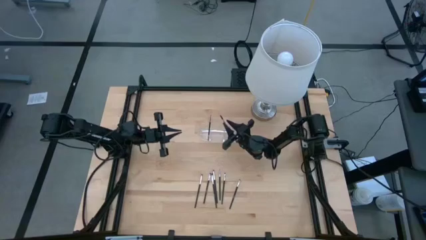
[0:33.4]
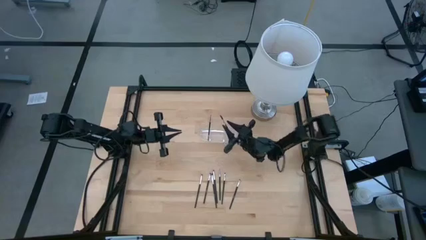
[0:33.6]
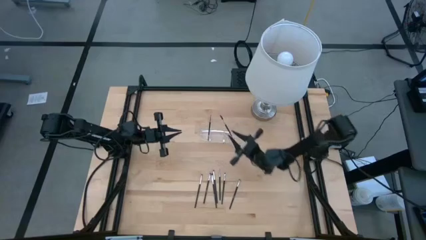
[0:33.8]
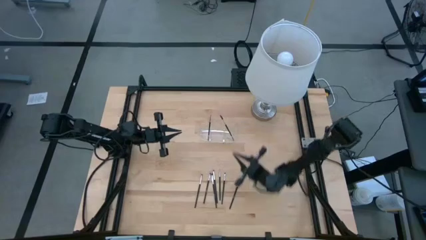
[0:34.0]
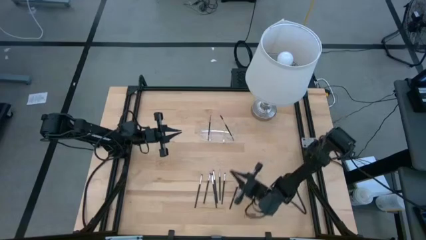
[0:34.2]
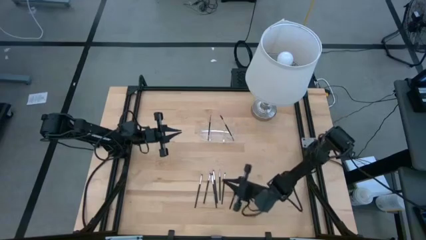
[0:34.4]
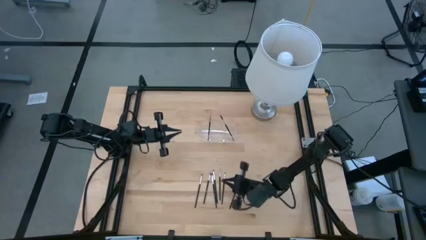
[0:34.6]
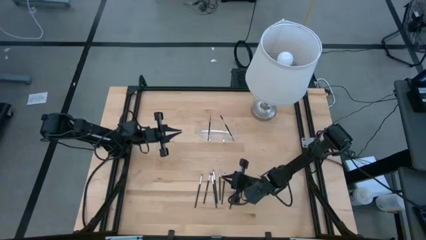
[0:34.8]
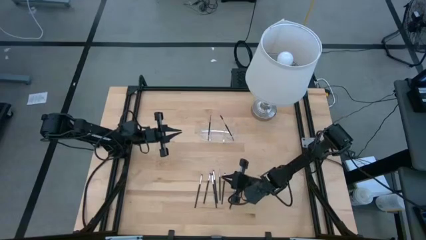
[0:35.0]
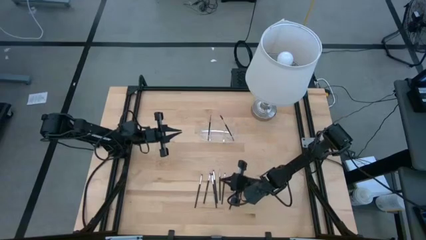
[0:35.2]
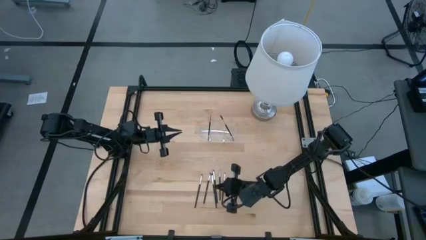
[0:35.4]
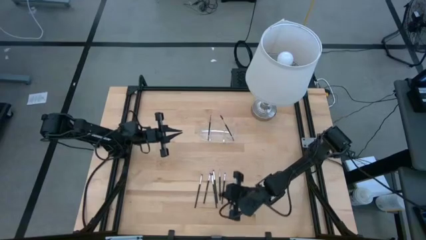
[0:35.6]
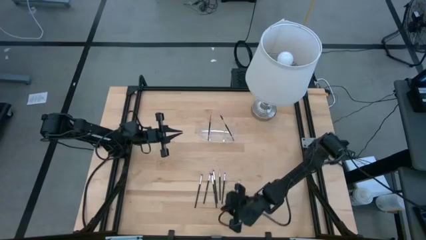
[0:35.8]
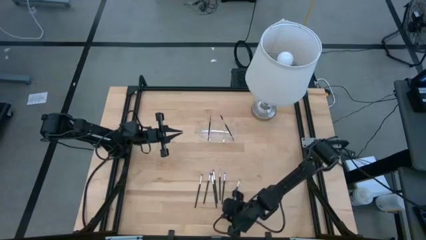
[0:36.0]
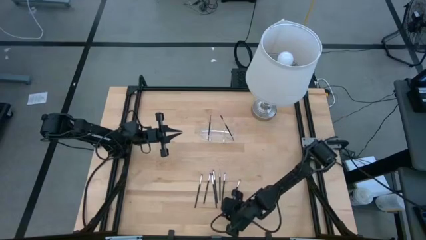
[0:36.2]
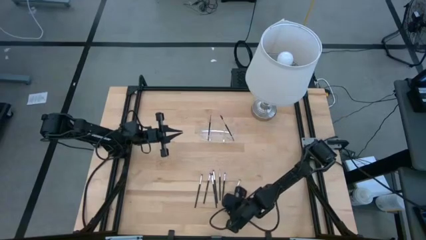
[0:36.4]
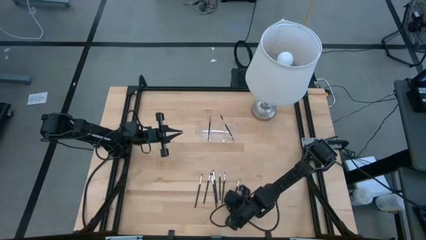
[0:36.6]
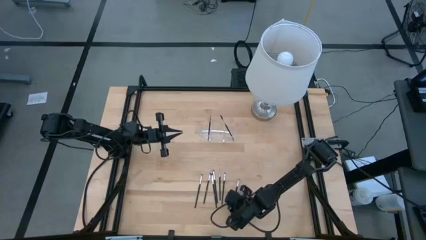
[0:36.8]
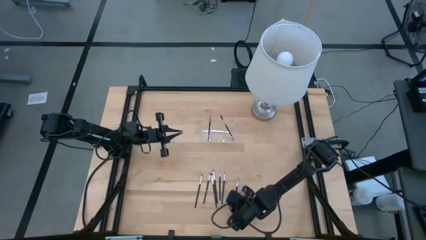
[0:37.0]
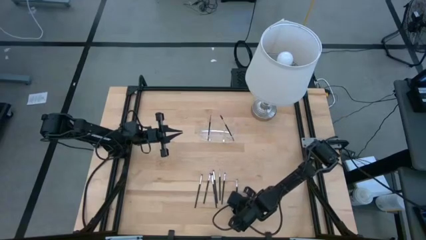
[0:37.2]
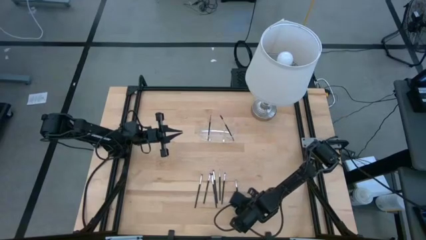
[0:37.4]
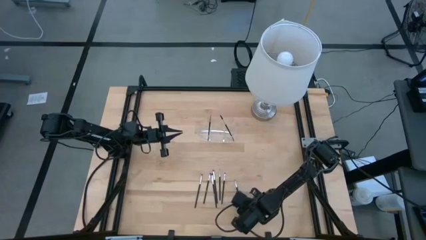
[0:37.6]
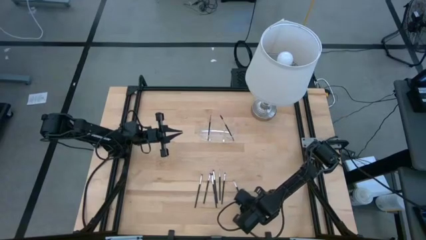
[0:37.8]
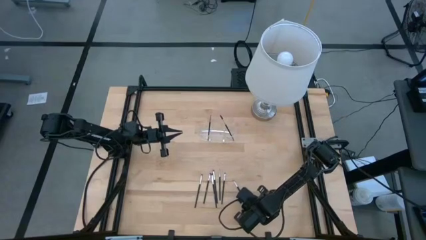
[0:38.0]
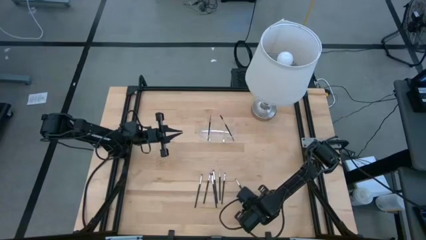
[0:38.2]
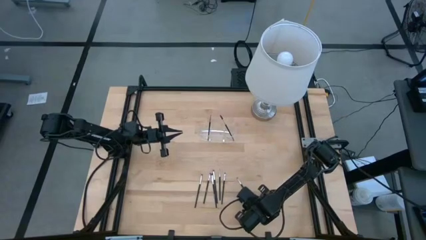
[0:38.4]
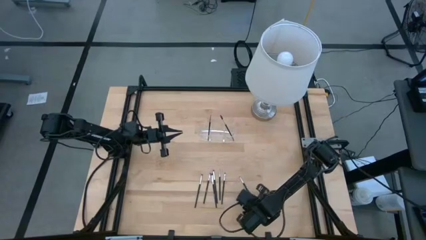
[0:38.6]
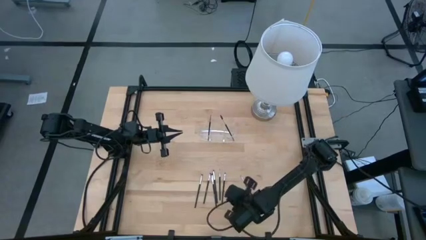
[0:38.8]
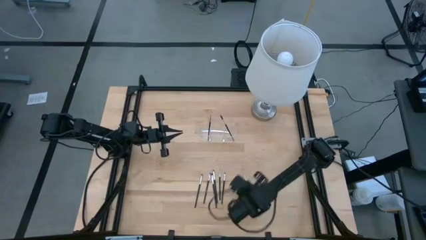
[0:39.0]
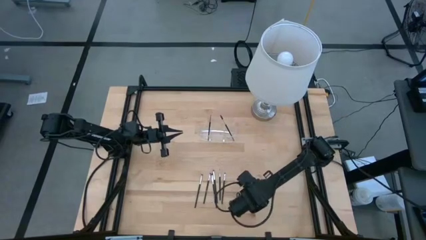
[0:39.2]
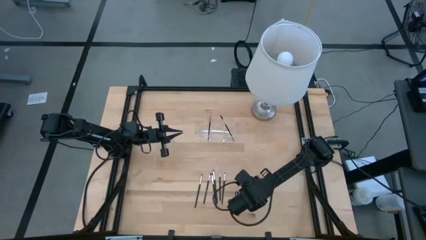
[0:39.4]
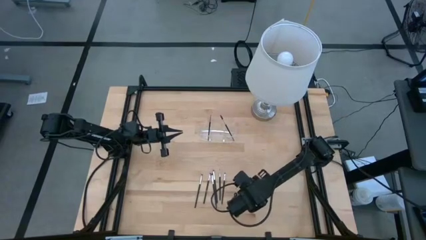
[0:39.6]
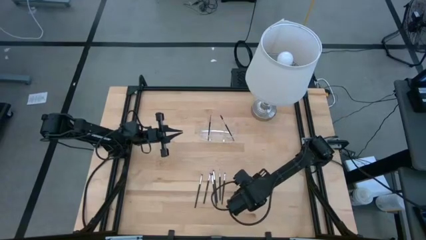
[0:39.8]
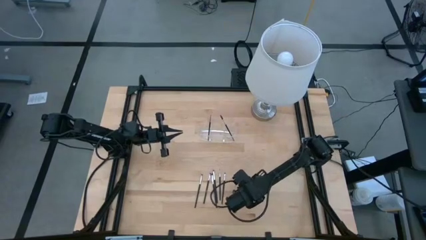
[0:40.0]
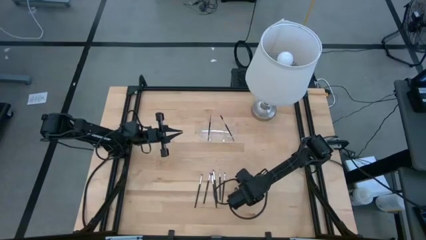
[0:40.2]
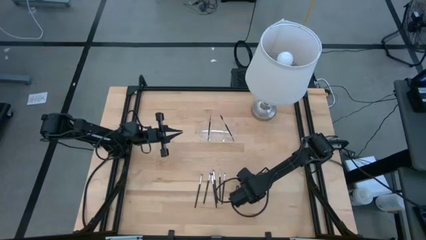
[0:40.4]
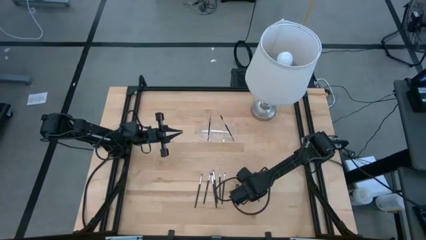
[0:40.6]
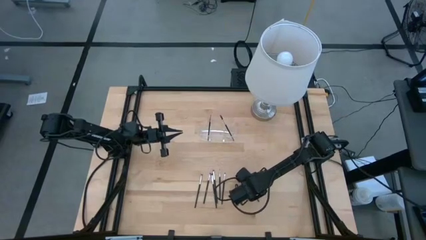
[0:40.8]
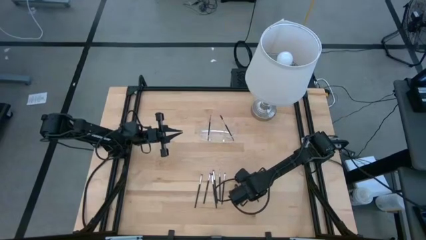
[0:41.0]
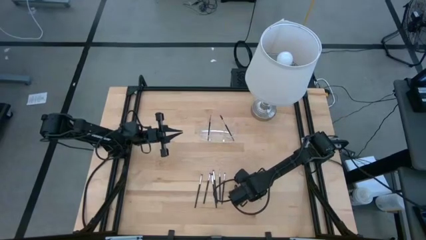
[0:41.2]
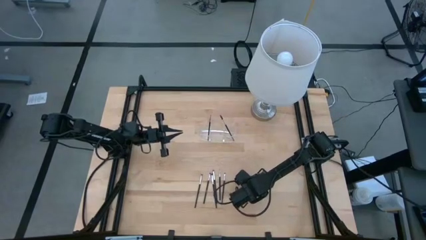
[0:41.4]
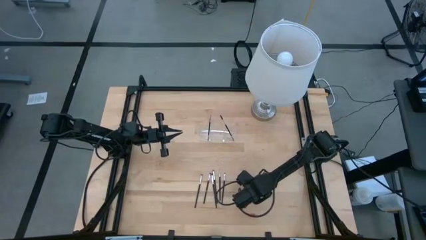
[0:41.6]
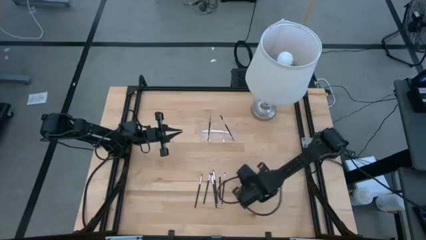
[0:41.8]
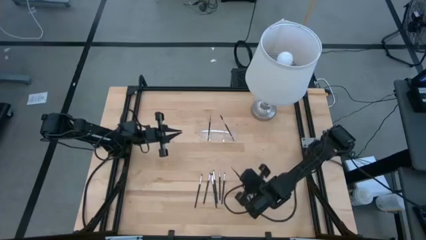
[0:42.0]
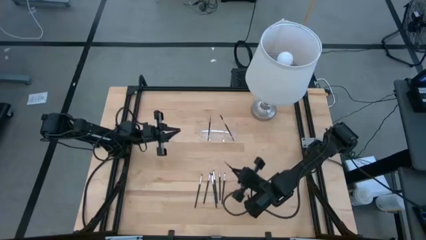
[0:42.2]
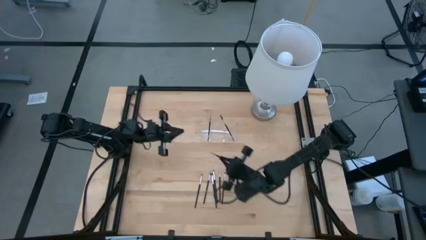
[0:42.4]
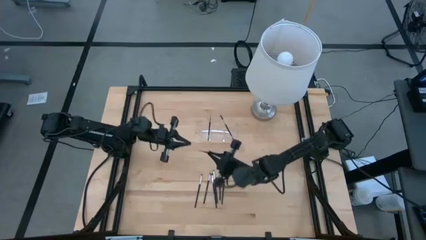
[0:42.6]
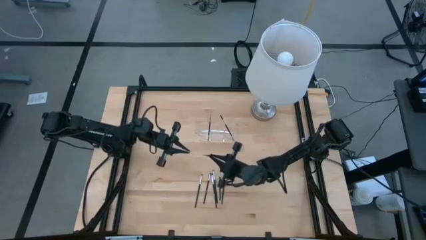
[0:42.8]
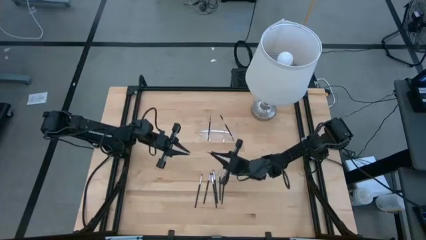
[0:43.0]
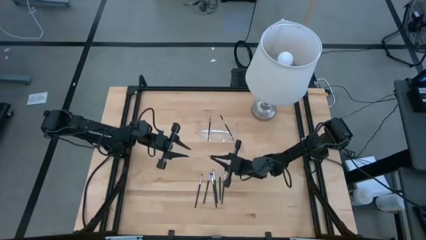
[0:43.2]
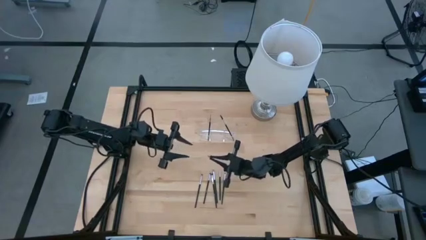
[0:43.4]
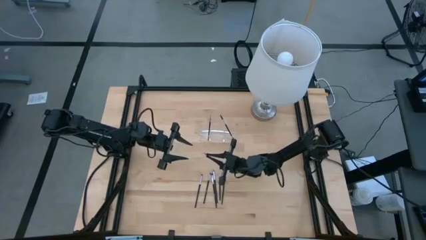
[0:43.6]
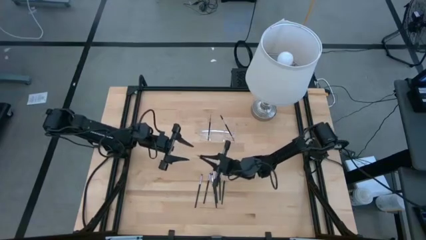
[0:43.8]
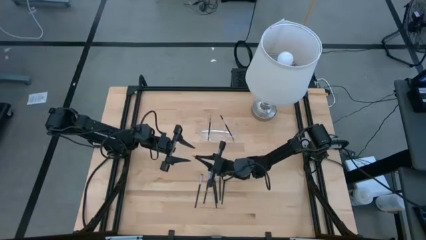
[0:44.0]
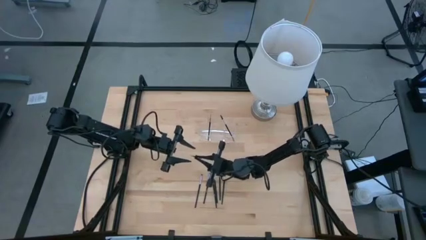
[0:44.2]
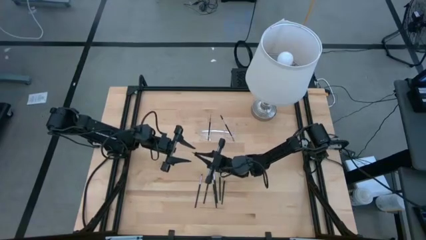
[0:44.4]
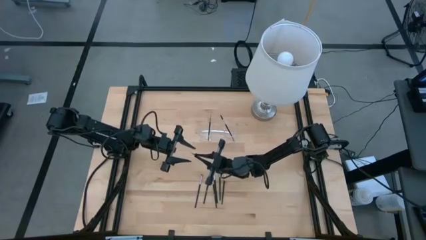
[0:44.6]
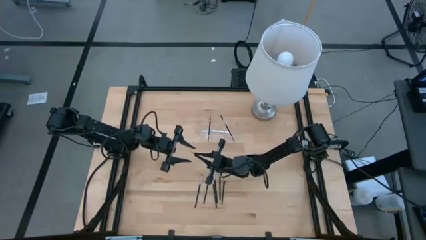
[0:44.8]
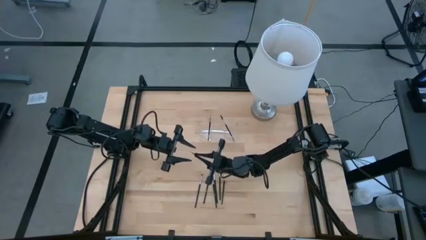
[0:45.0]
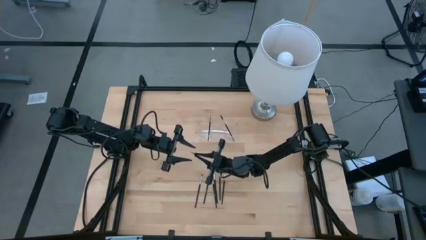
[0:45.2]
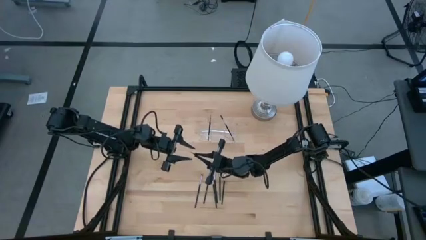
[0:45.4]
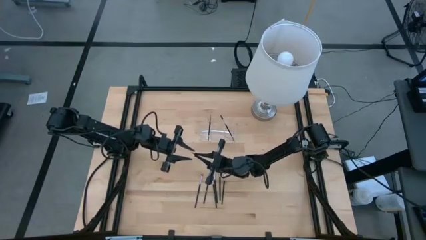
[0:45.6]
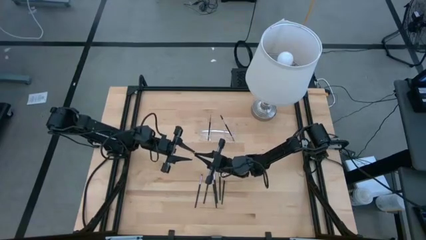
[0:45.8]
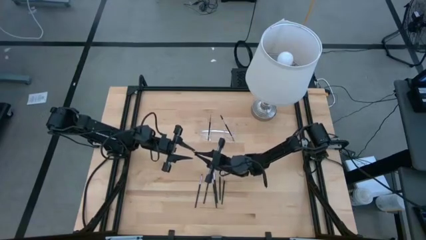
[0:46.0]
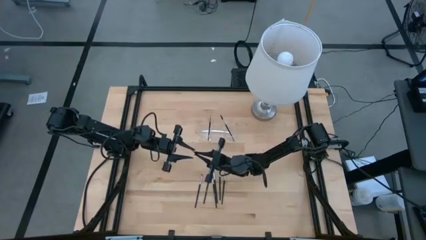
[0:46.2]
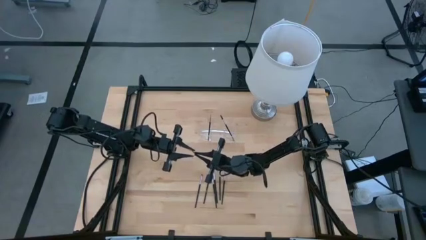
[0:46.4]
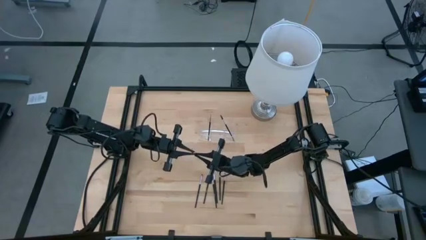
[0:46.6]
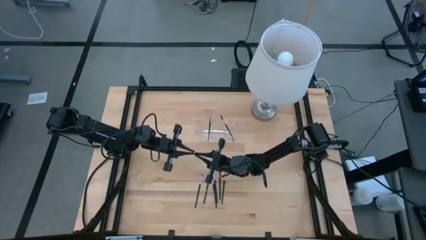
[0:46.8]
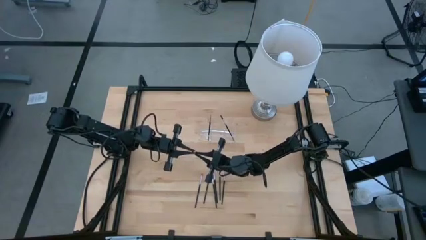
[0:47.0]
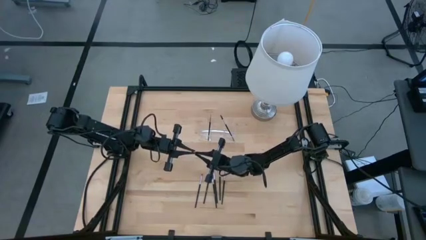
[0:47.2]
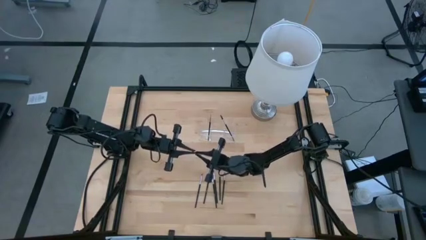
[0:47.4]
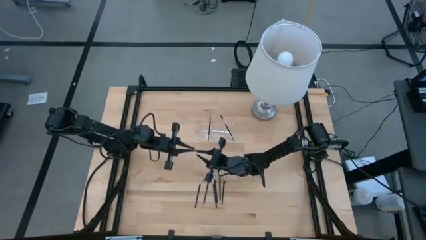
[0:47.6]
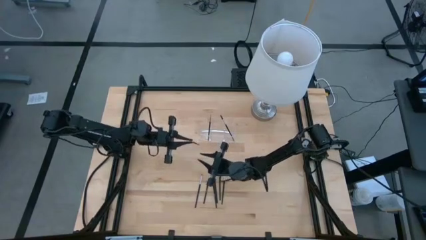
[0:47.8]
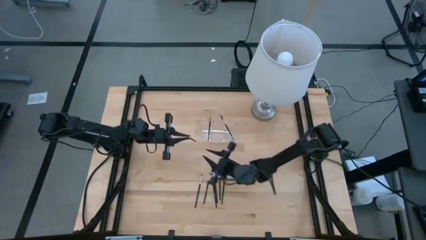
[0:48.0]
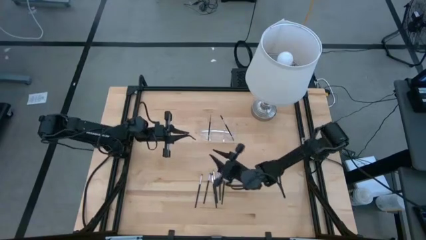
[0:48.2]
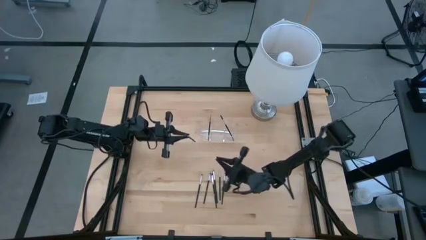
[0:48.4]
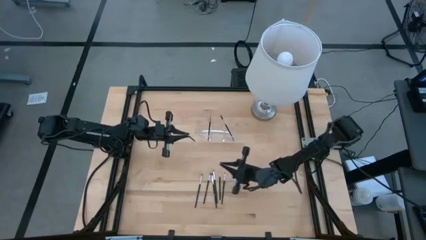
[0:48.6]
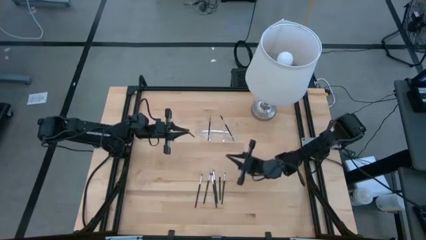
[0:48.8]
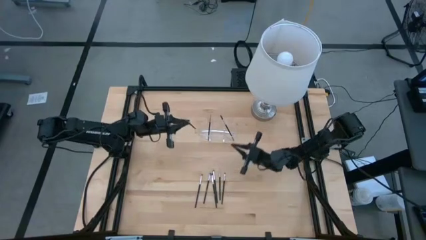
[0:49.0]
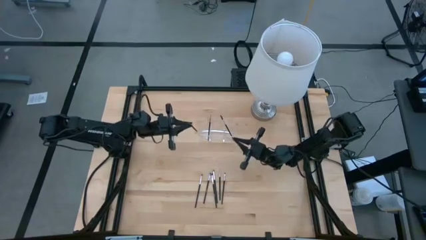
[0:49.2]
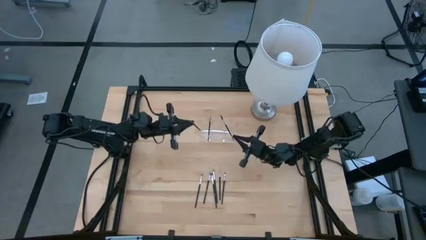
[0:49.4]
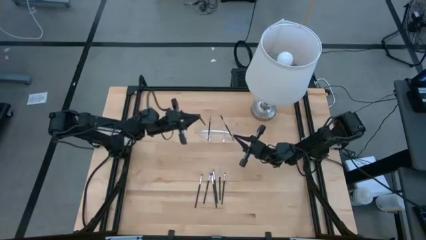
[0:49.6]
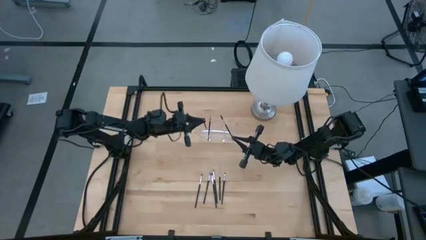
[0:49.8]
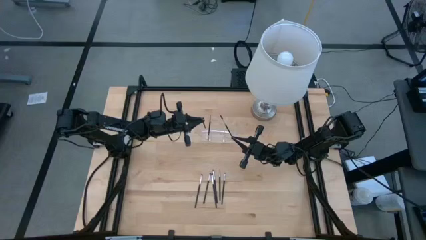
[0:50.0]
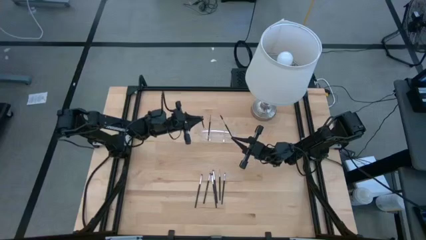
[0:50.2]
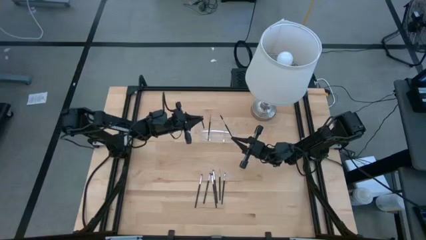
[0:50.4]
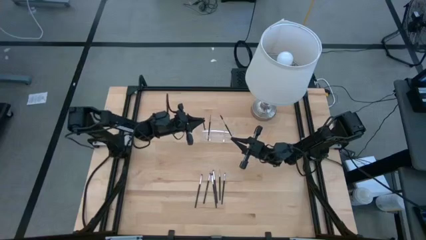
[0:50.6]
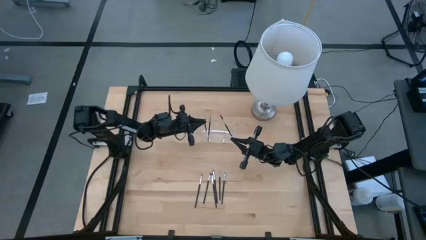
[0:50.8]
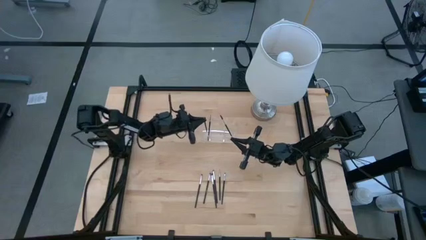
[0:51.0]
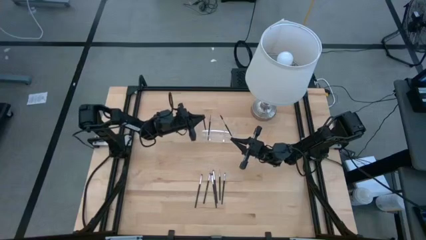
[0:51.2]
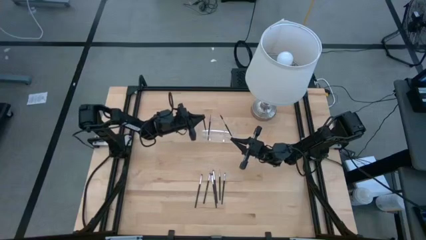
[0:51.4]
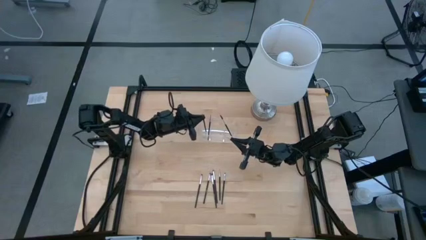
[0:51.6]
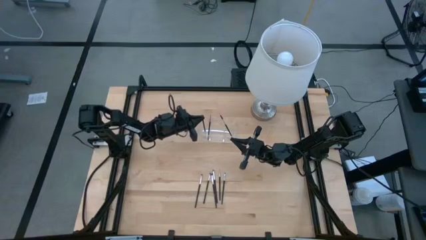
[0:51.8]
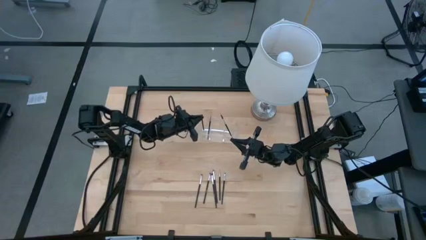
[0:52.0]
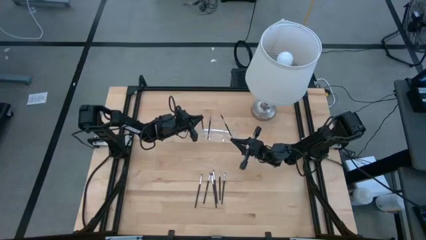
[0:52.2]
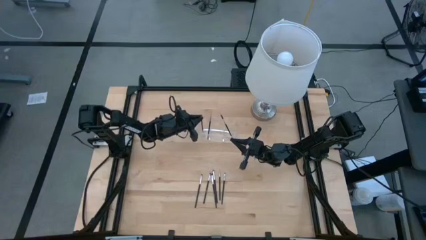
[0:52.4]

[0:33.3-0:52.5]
Task: Put items in baskets/containers
Put the black liner brush transparent organizer
